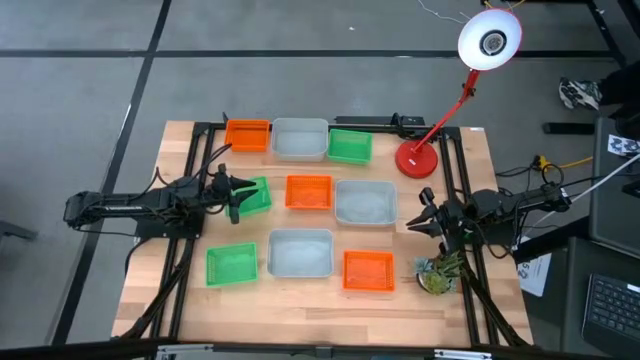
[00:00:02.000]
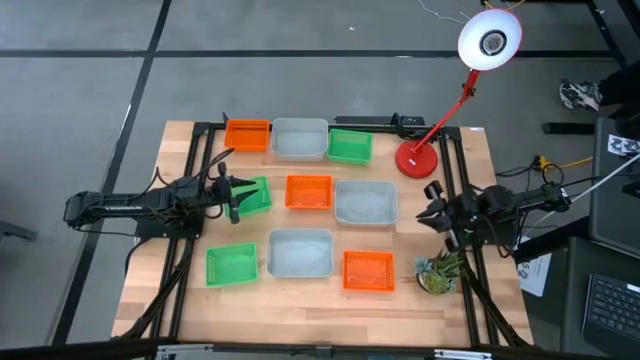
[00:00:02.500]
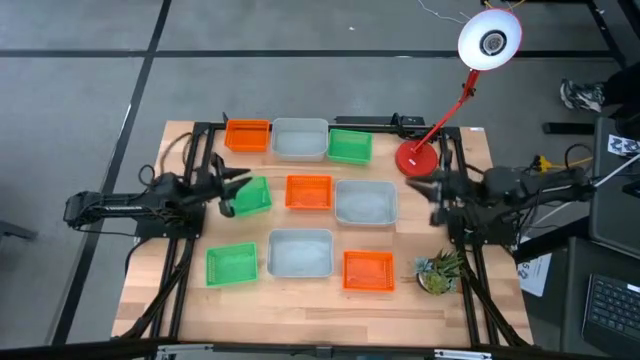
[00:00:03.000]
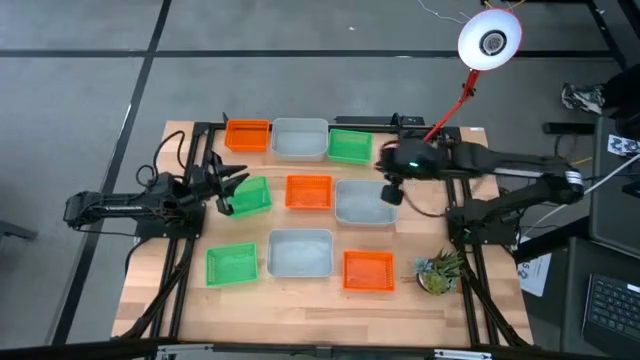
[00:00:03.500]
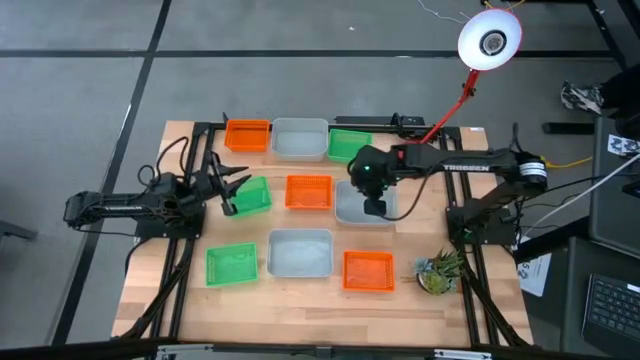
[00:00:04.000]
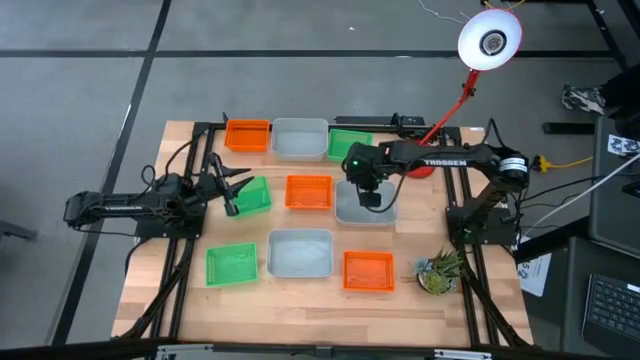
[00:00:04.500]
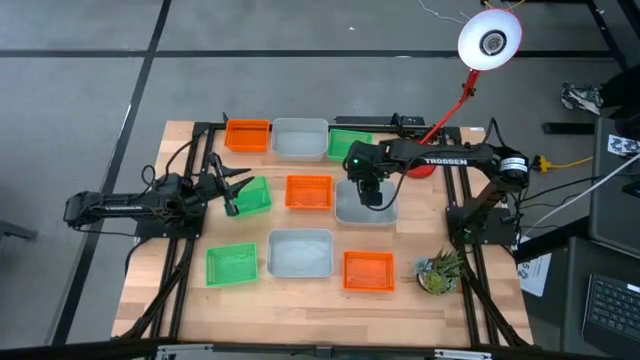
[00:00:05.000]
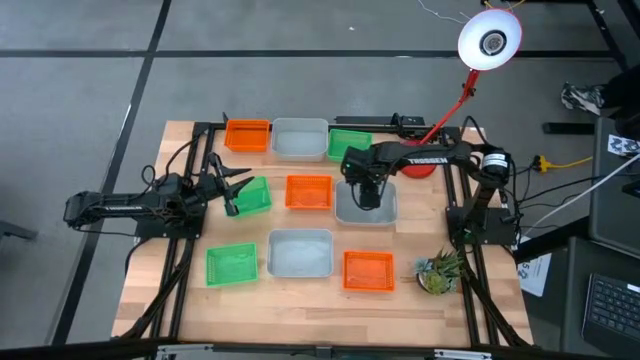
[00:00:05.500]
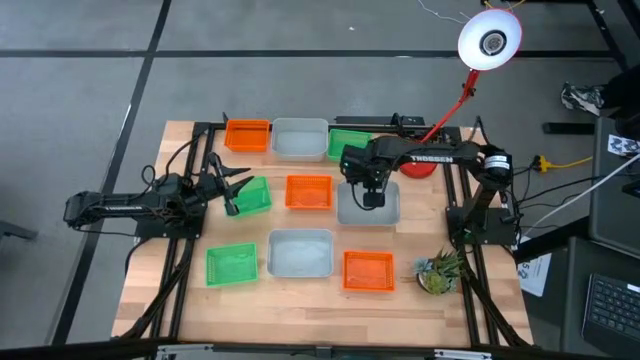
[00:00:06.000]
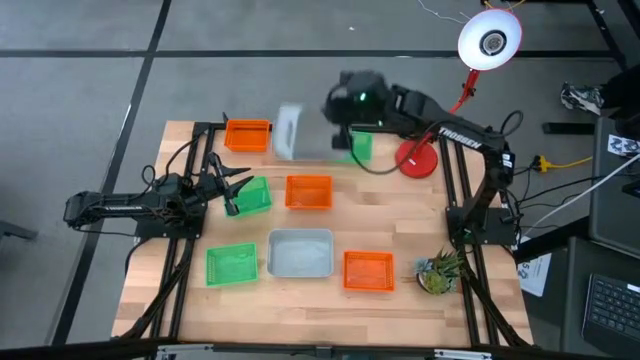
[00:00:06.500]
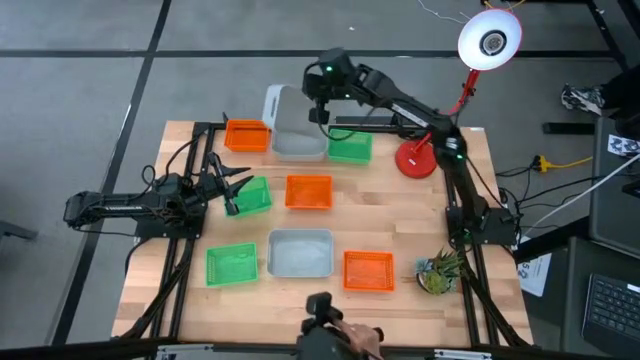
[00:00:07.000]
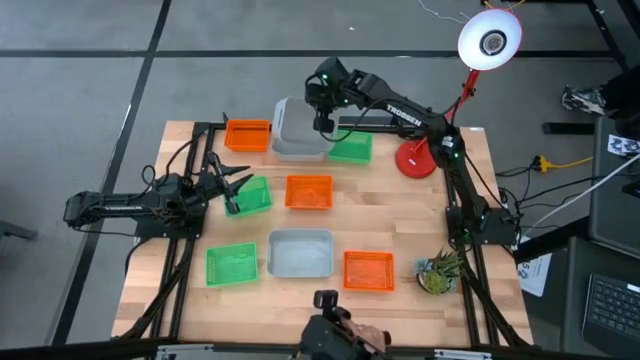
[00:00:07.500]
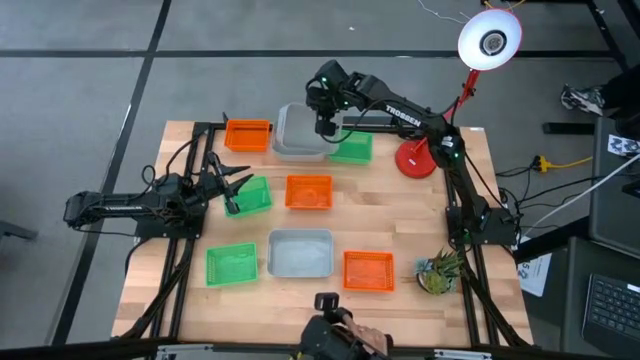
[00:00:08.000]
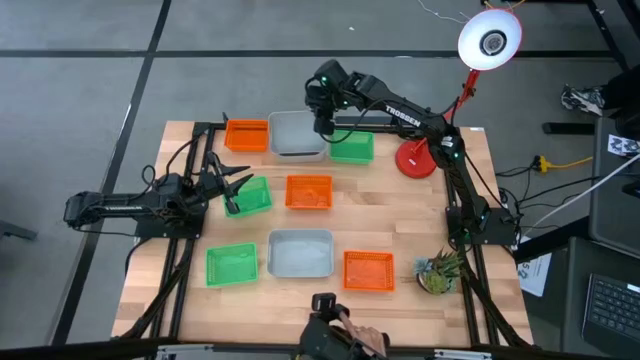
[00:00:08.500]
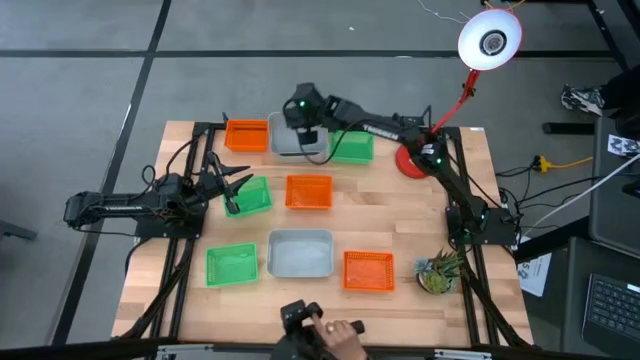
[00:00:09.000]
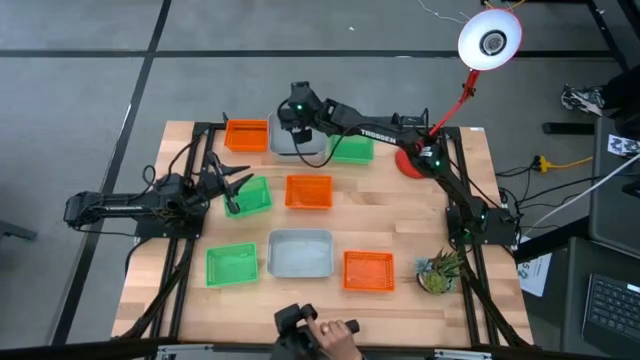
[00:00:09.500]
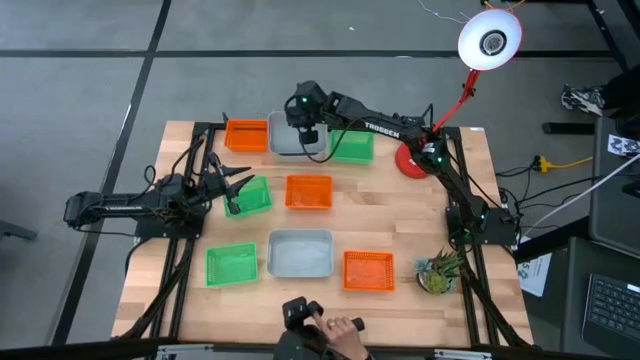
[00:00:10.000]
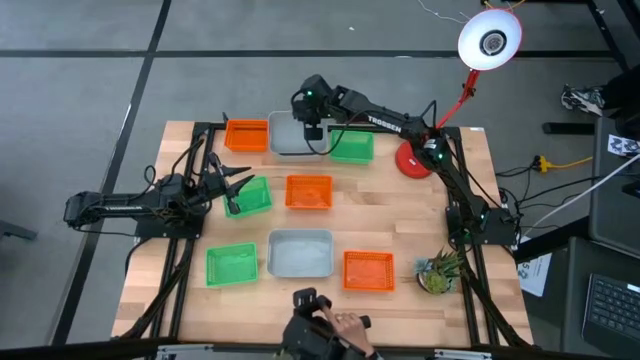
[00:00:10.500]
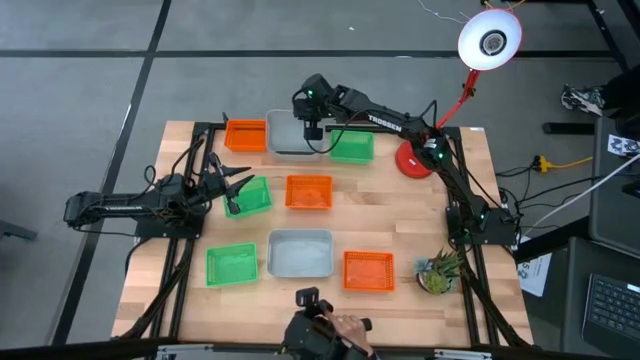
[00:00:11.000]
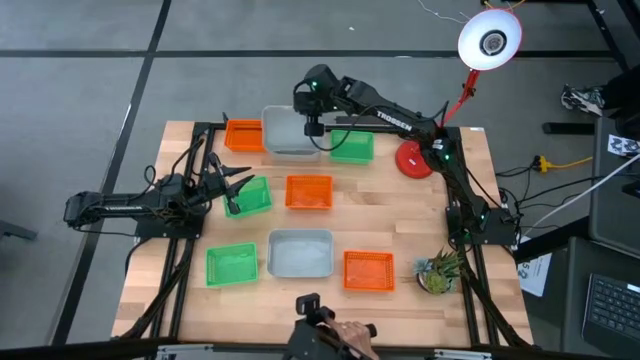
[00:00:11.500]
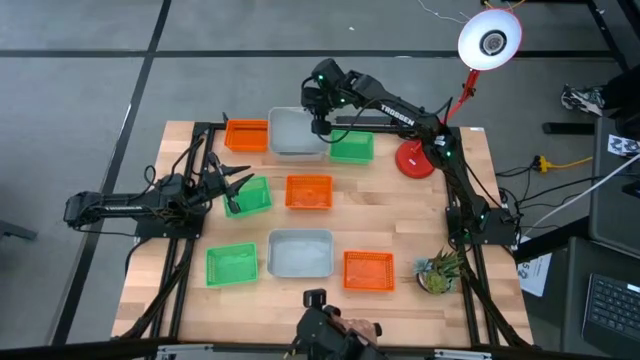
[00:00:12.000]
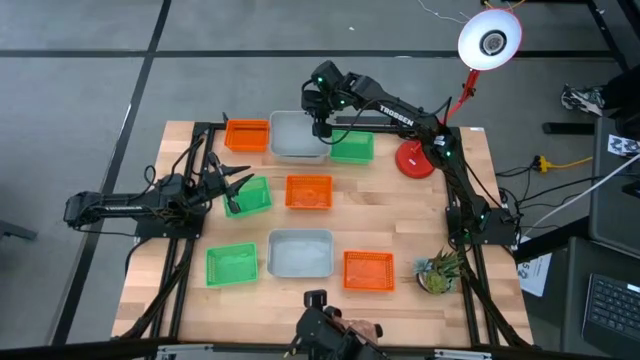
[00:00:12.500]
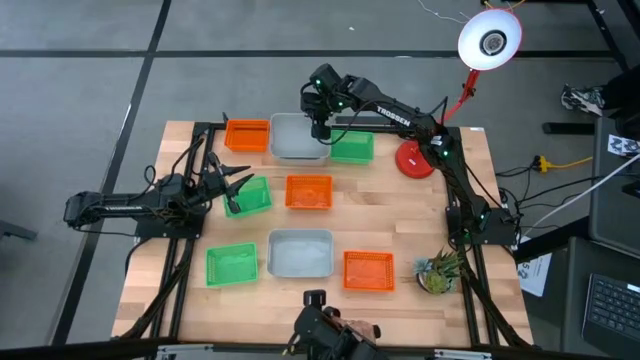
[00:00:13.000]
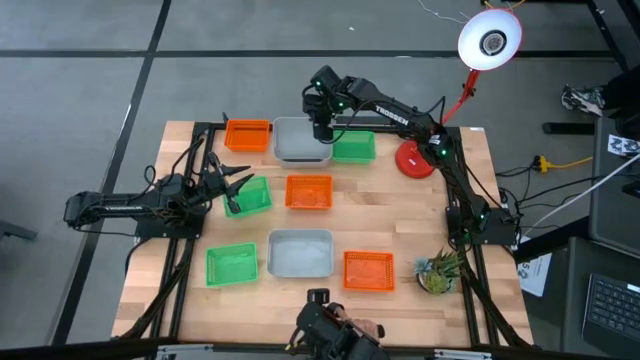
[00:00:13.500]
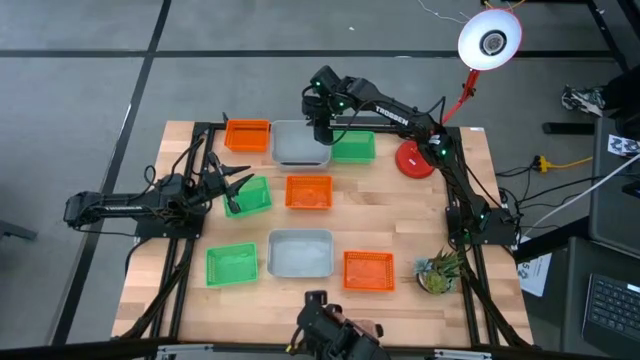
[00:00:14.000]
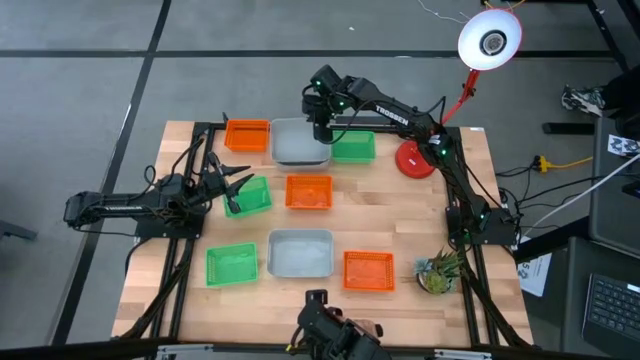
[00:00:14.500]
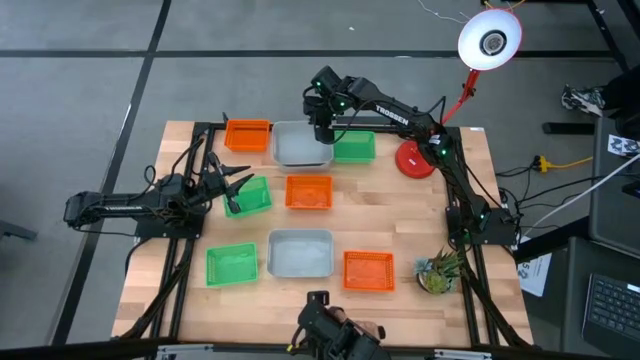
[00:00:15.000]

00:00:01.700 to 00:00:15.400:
Stack the middle right gray bin on the top gray bin

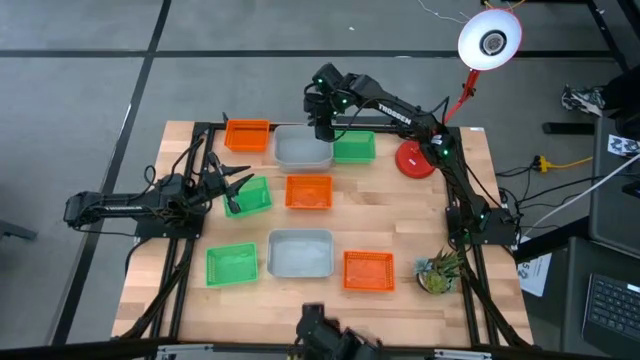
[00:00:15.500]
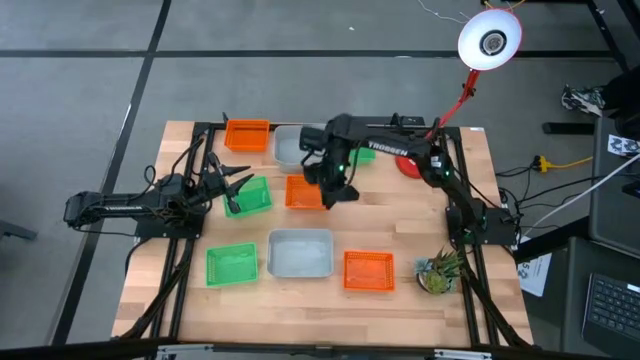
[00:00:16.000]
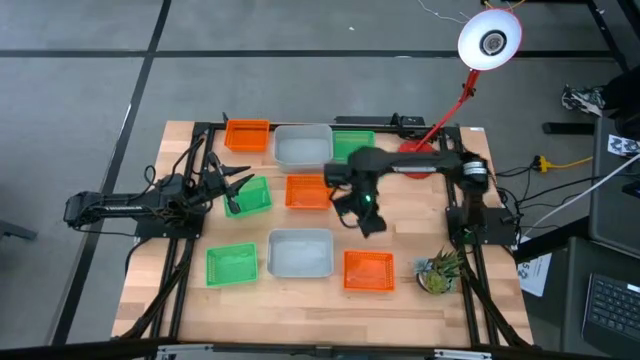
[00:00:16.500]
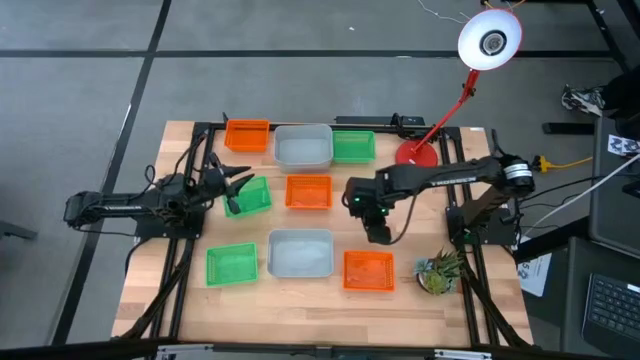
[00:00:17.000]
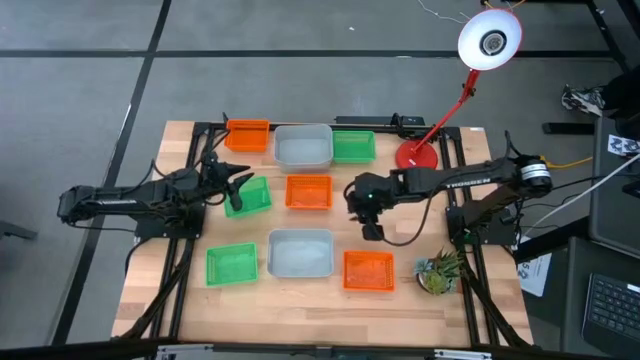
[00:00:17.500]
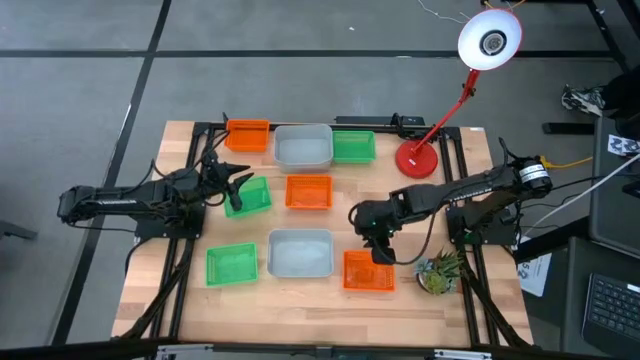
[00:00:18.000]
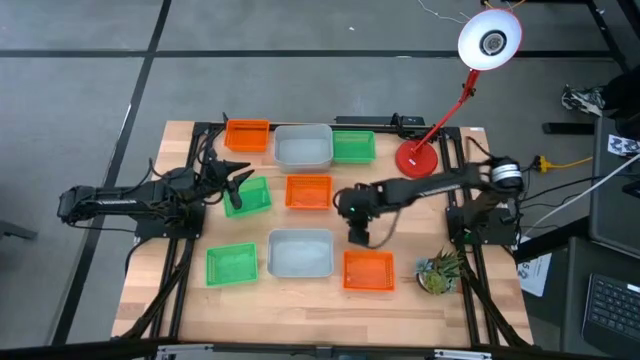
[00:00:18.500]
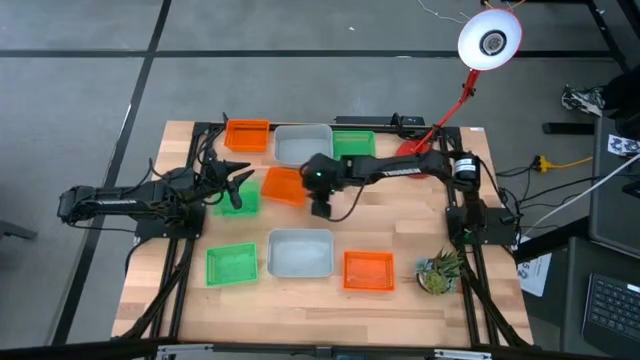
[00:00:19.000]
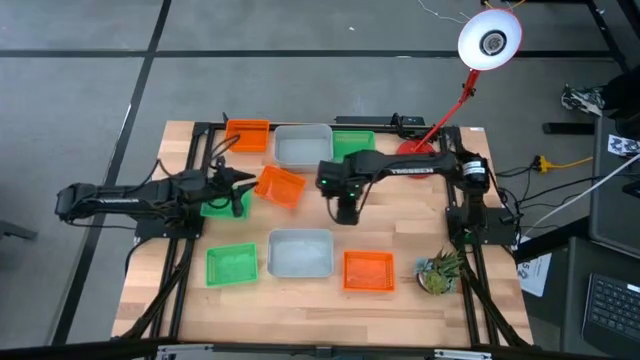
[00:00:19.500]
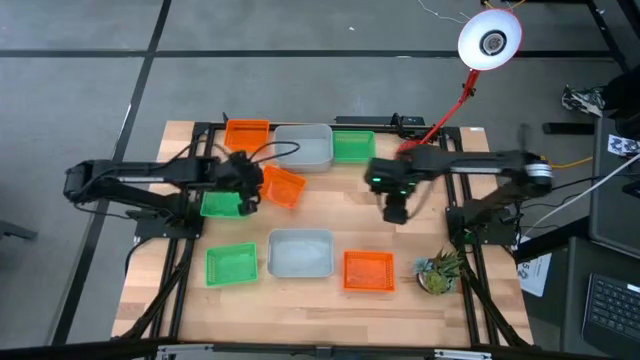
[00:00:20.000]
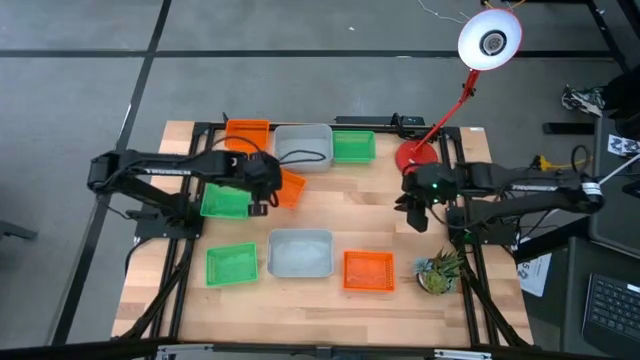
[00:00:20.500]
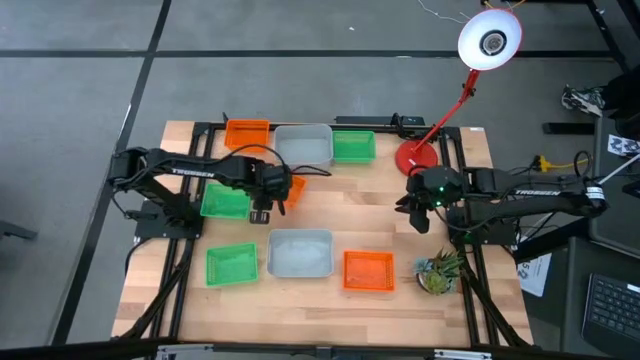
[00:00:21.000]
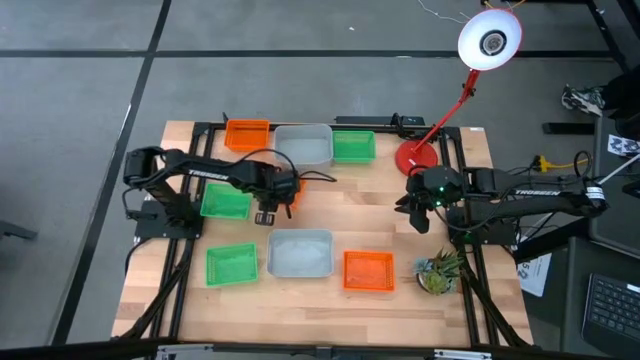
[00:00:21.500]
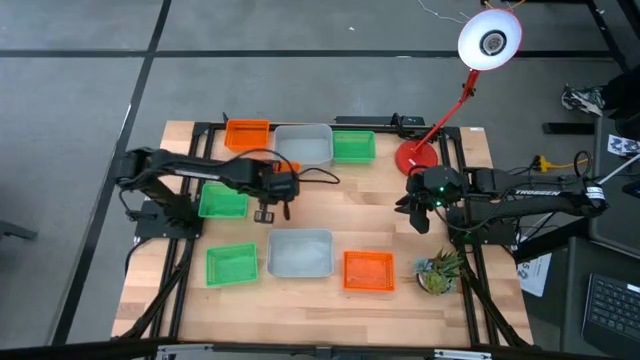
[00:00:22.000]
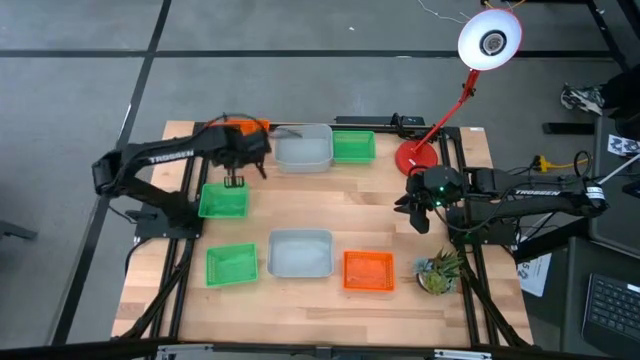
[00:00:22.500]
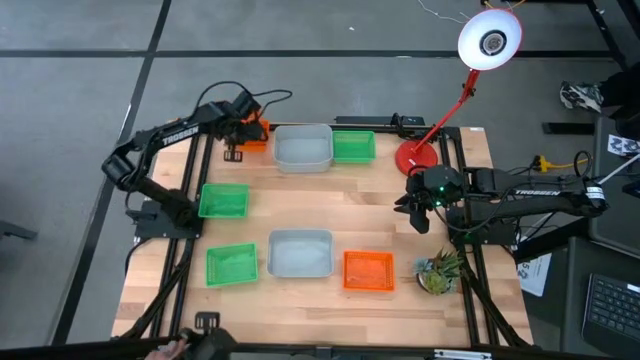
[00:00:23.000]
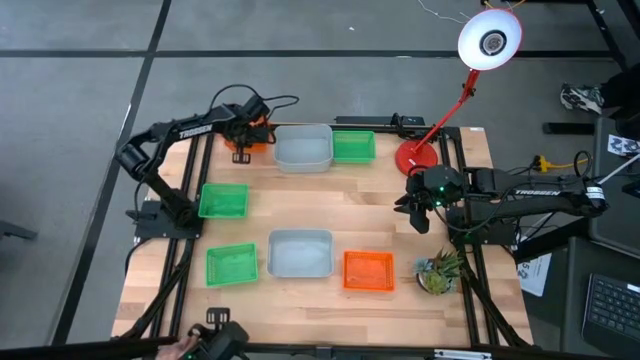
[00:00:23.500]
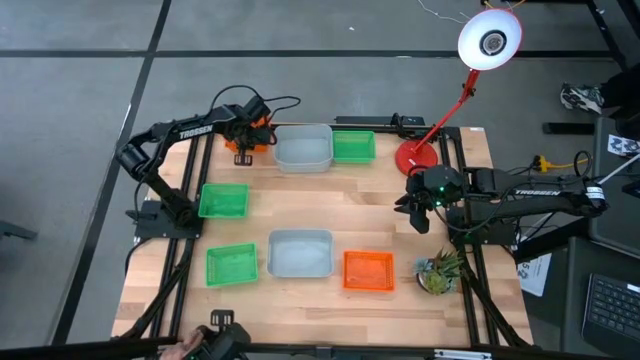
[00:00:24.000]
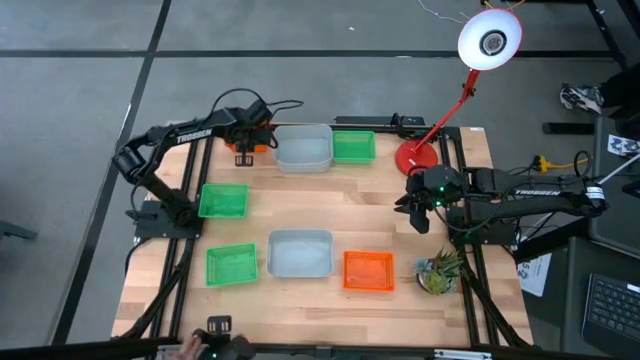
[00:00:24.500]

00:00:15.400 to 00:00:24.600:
Stack the center orange bin on the top left orange bin
